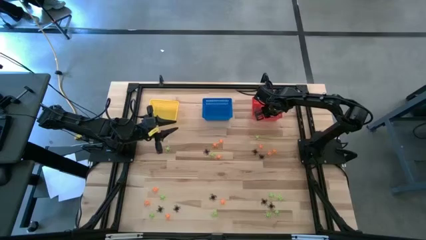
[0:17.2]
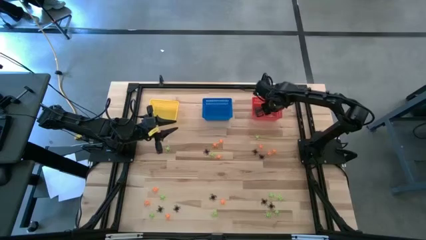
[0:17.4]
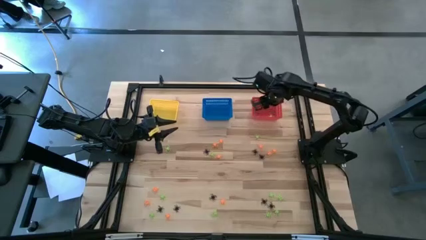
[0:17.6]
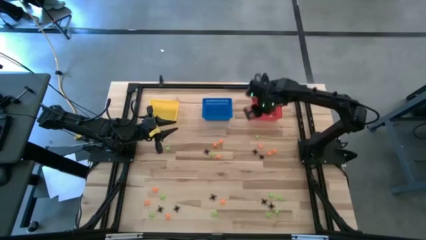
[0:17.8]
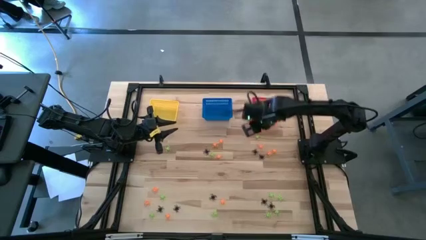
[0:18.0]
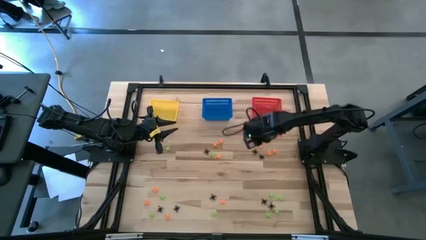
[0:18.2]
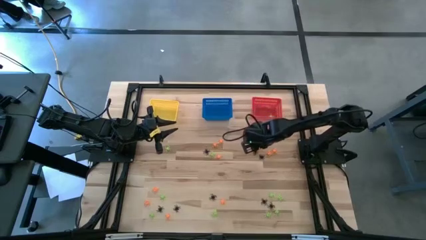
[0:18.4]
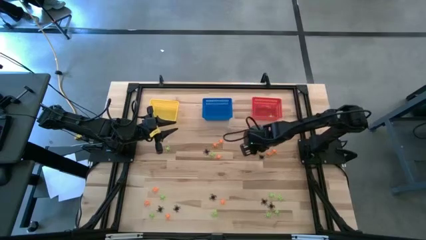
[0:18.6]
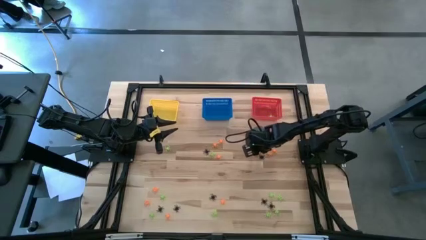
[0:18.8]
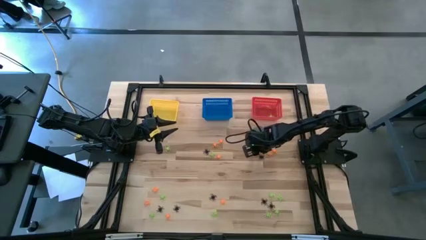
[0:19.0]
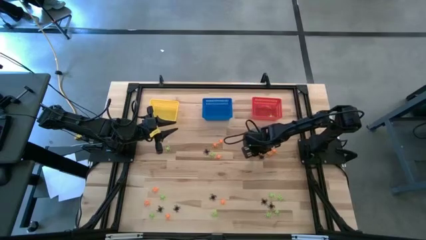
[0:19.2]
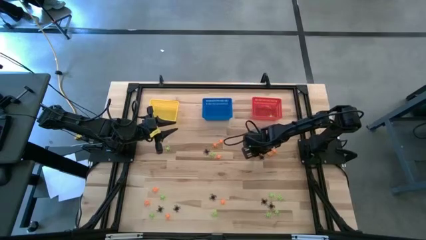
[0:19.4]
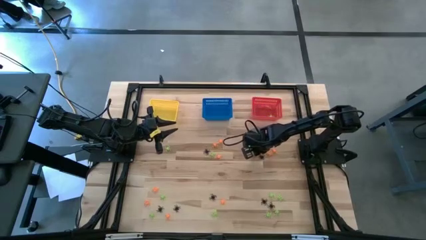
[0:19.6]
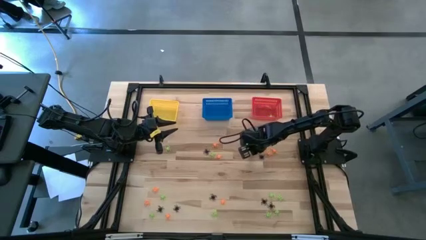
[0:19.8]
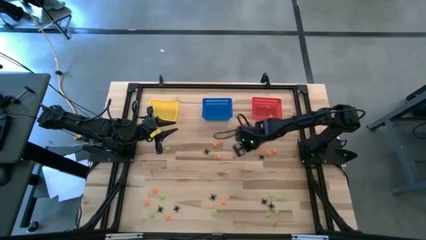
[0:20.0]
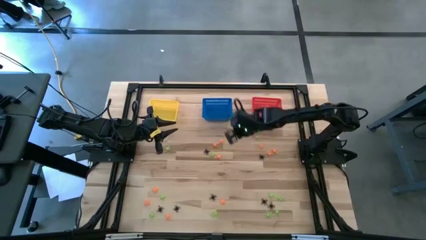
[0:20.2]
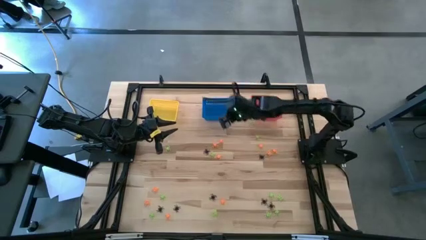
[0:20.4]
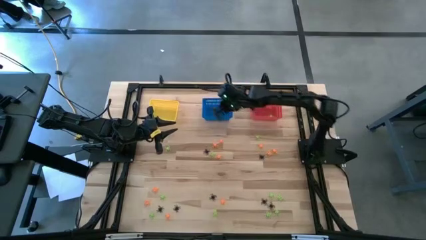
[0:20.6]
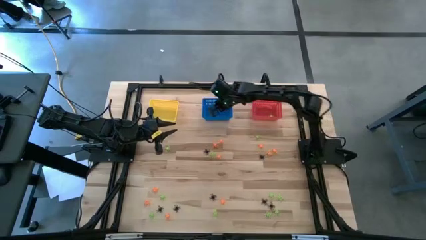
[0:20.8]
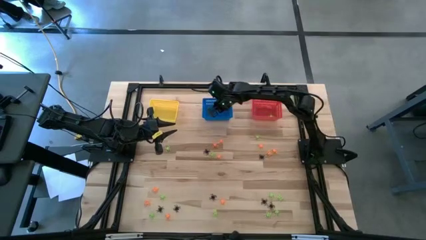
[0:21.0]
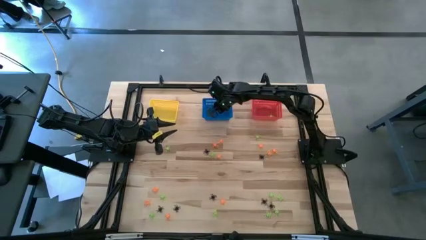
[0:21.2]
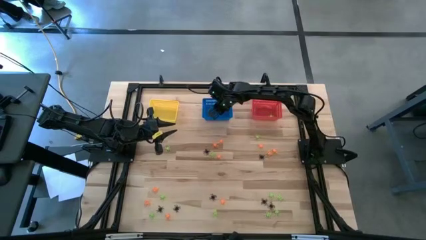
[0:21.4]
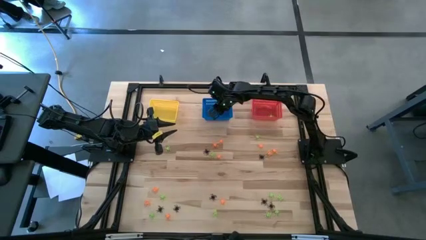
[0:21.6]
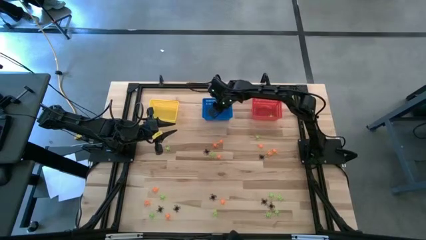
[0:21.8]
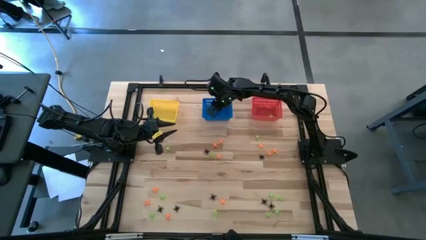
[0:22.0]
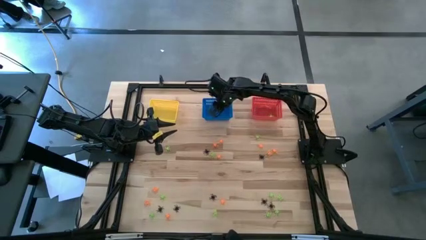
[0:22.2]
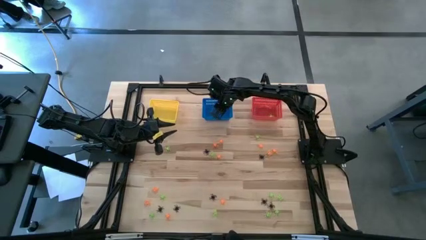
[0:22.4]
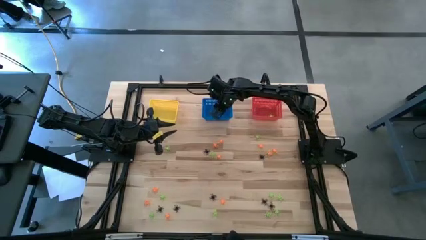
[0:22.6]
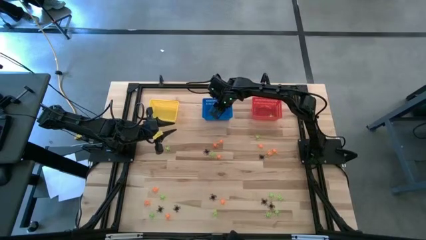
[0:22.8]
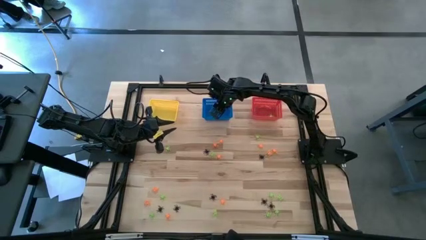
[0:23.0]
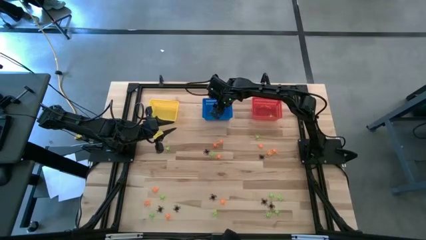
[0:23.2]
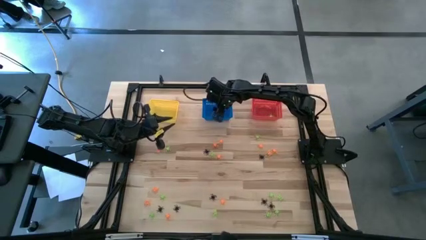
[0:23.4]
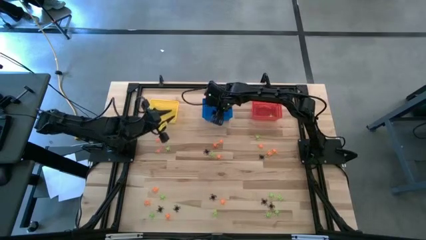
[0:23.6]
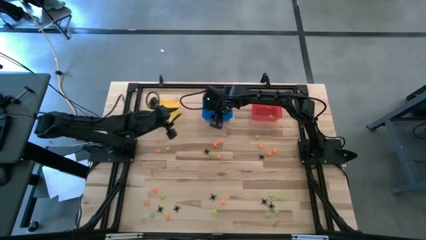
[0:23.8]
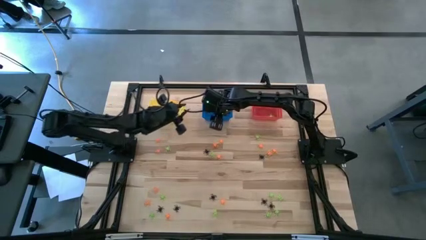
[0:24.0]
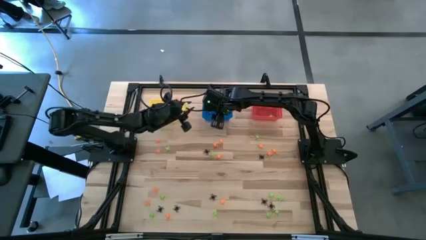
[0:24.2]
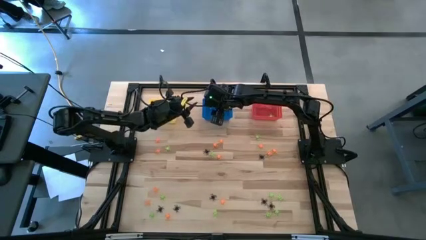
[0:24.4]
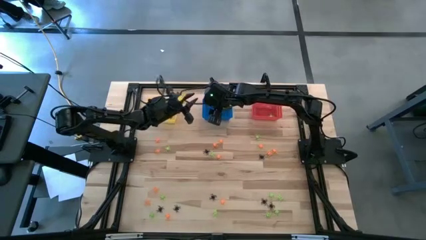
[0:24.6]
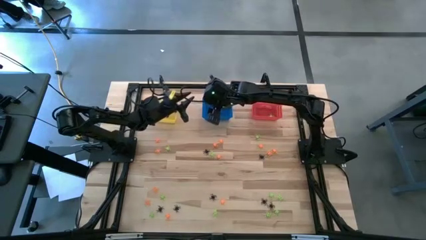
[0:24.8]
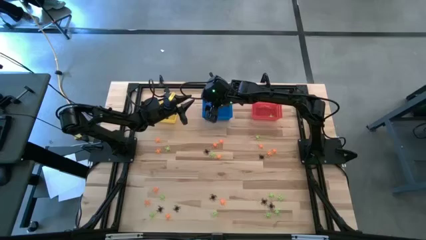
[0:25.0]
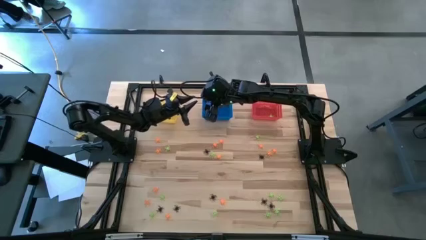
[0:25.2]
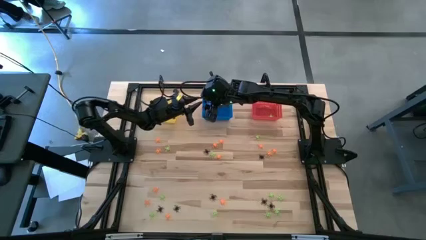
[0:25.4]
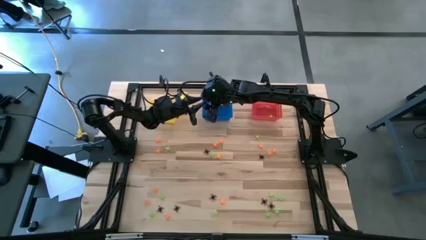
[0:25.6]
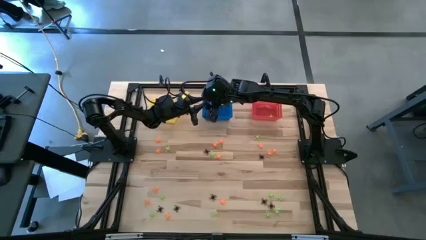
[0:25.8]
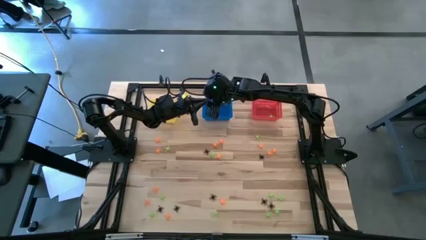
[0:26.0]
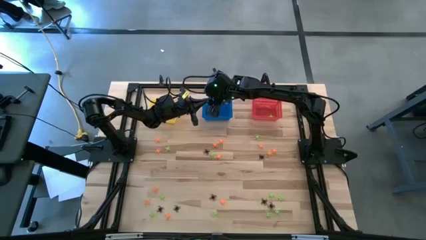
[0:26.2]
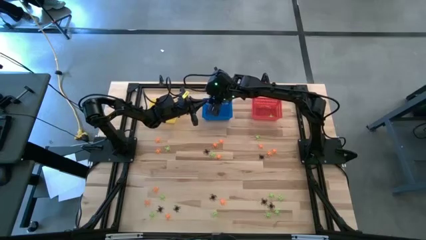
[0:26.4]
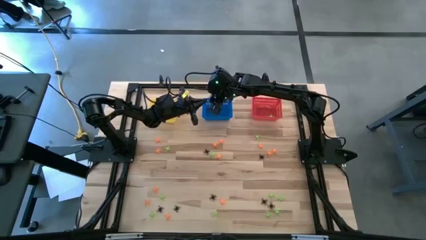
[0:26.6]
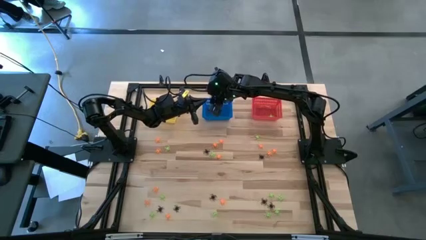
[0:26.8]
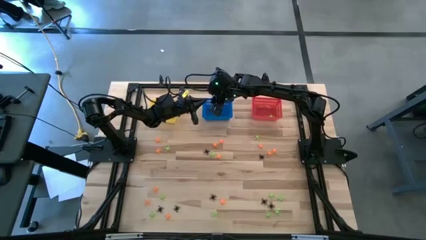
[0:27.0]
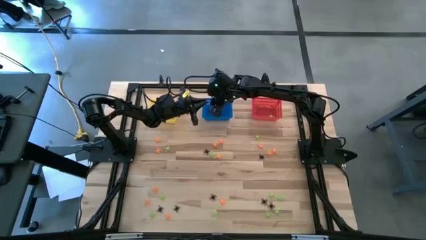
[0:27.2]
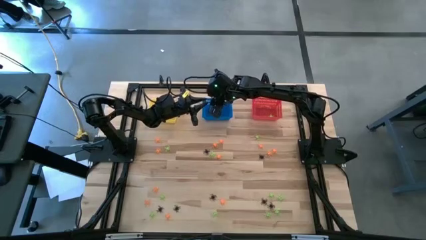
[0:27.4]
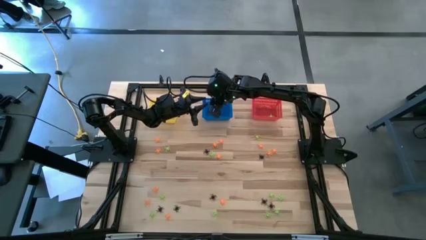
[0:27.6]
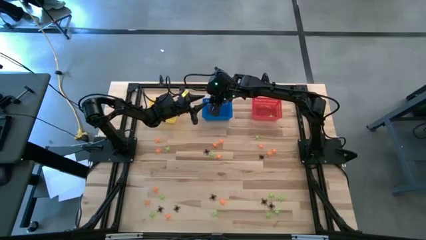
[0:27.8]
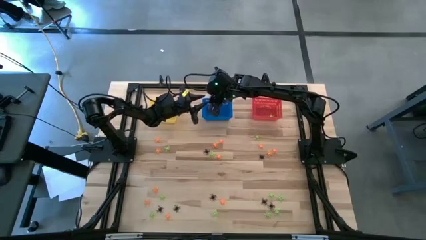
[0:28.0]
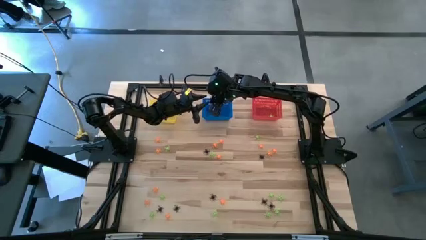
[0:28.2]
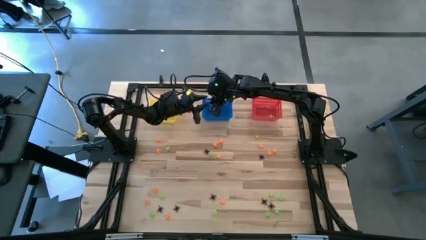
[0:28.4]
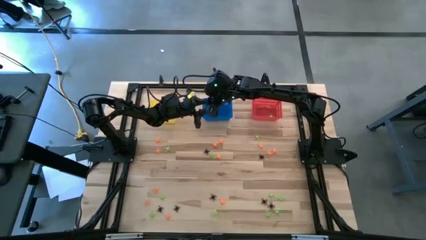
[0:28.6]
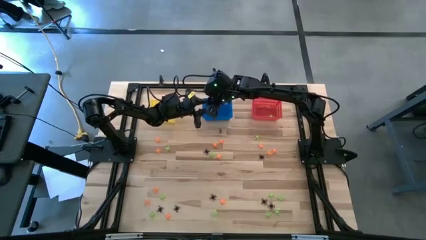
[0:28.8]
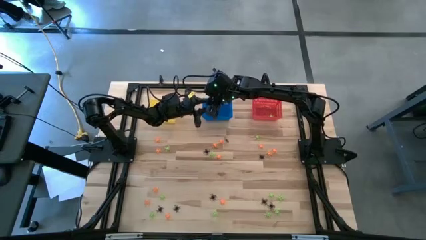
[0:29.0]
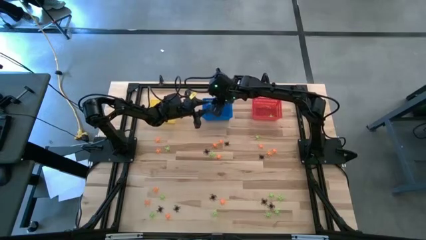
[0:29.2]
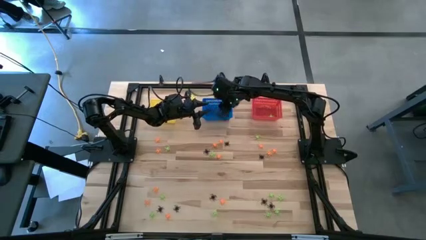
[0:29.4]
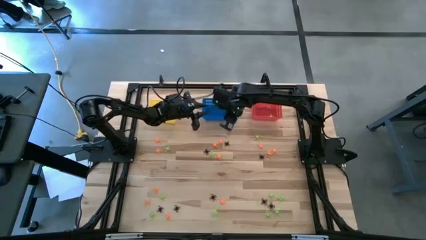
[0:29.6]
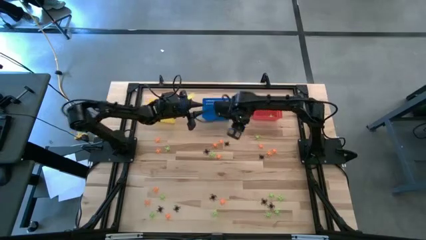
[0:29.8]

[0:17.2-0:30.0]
Task: Sort Halloween decoration
Put the black spider toy into the blue basket

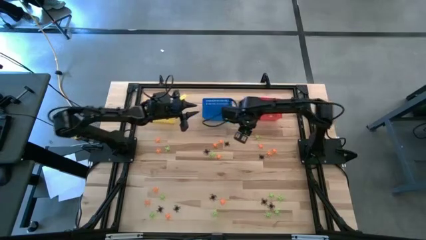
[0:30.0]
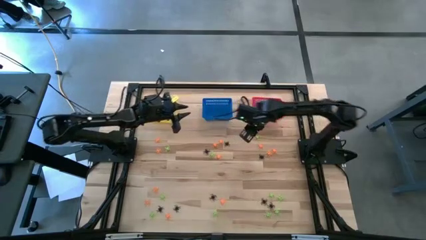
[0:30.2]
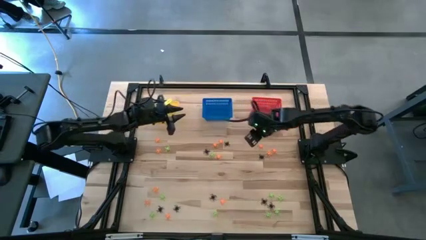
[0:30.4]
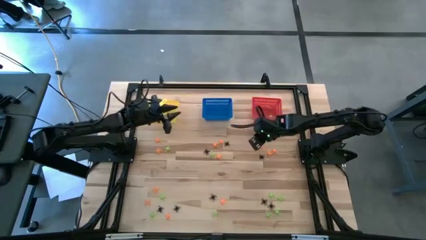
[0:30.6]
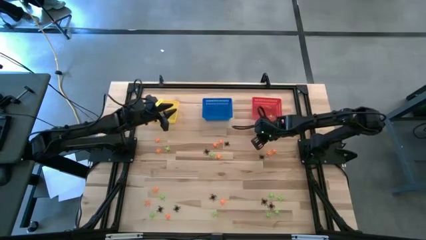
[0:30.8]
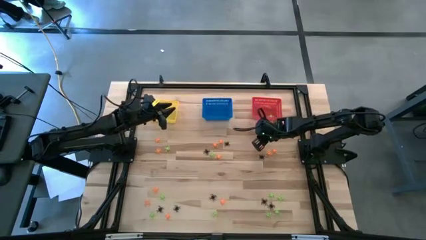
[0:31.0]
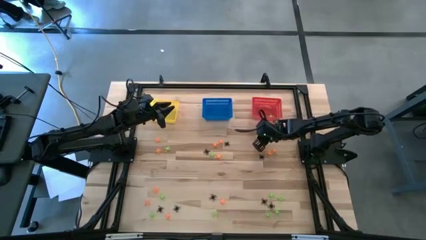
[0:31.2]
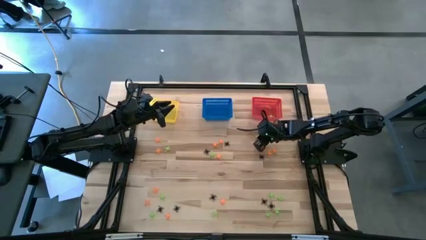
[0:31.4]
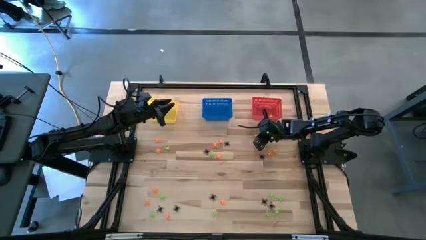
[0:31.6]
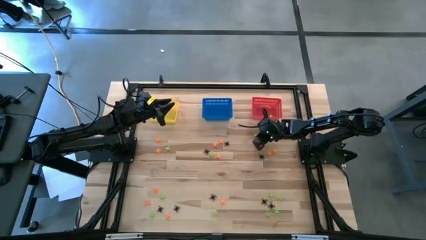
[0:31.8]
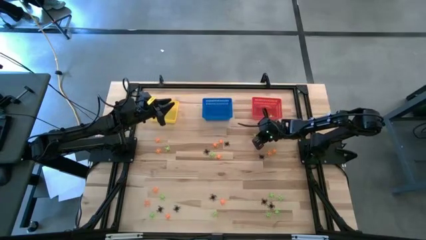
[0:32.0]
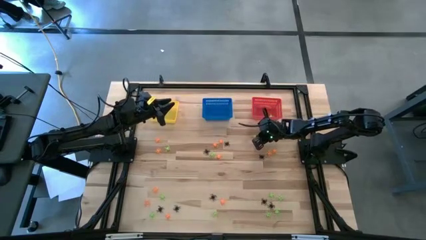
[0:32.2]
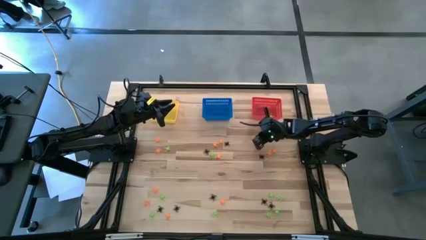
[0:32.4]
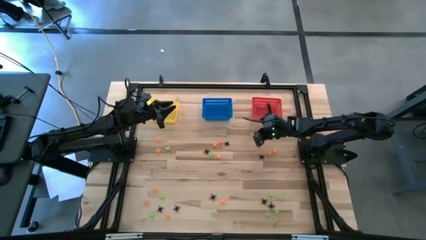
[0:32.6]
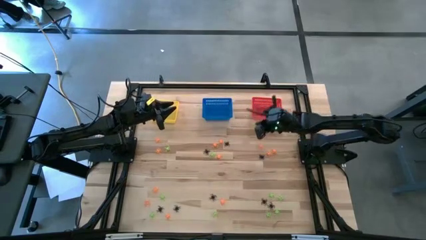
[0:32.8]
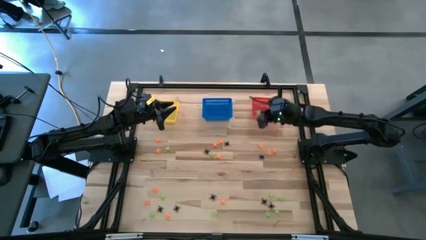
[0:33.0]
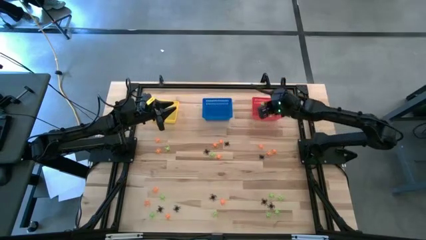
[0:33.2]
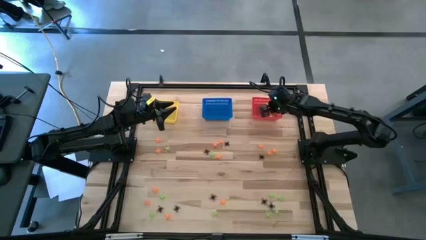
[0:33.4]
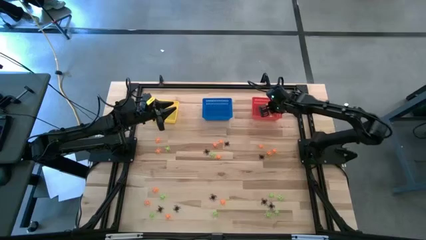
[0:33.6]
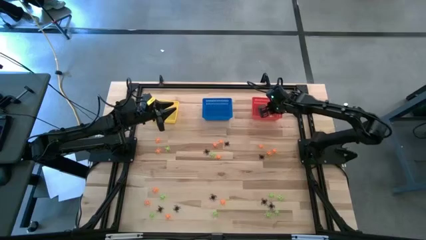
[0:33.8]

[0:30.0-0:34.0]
Put the green spider toy into the red basket
